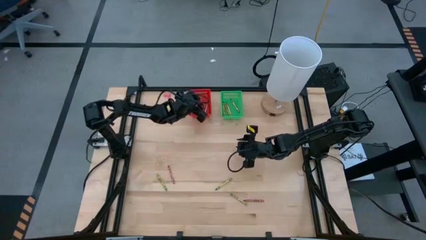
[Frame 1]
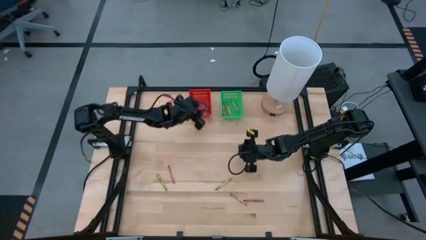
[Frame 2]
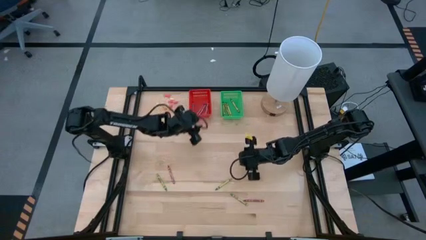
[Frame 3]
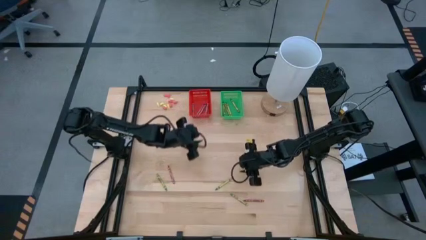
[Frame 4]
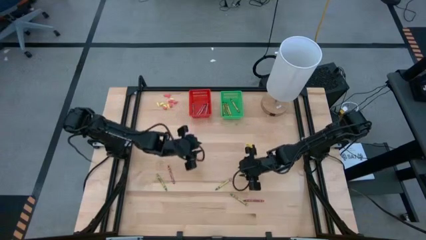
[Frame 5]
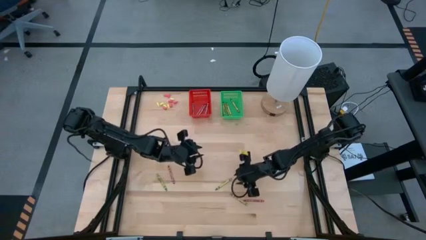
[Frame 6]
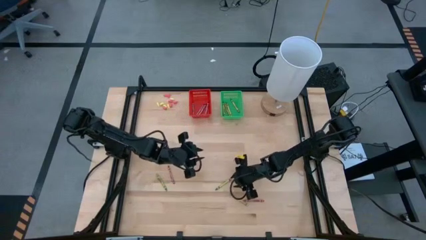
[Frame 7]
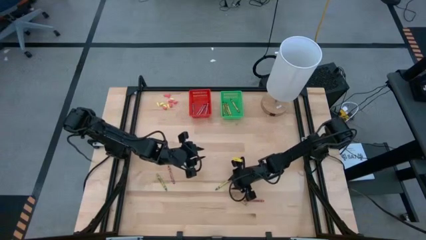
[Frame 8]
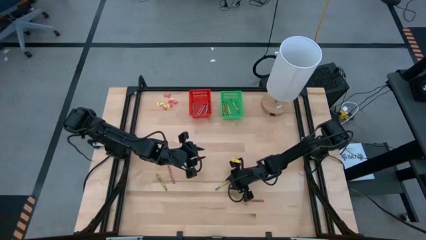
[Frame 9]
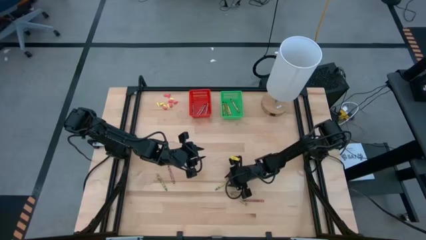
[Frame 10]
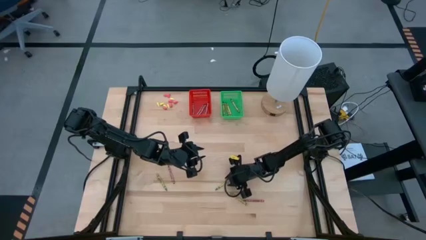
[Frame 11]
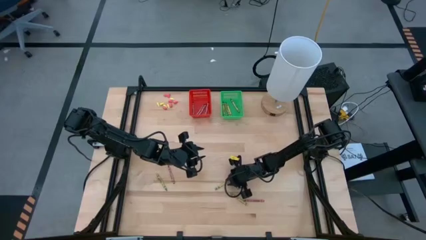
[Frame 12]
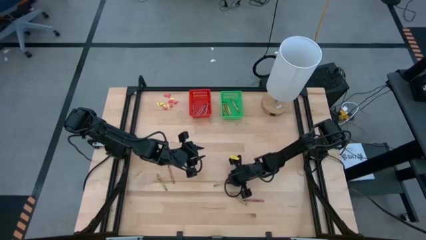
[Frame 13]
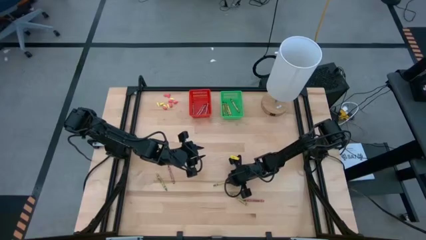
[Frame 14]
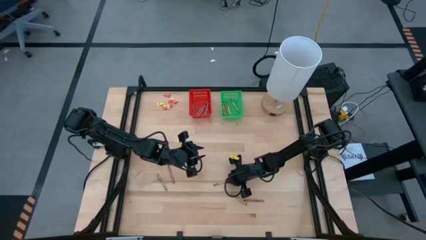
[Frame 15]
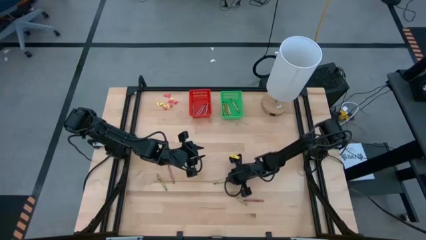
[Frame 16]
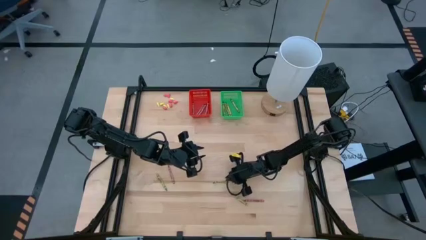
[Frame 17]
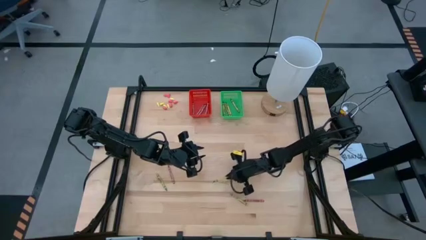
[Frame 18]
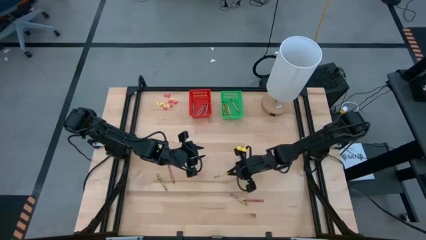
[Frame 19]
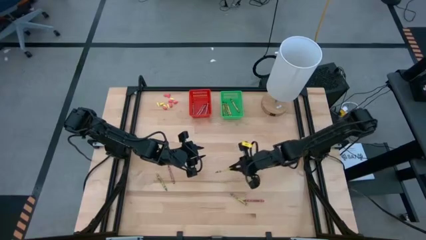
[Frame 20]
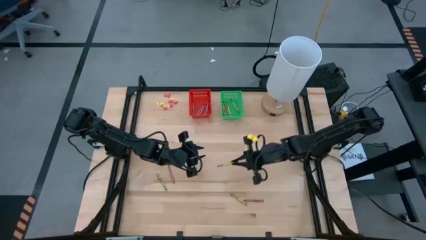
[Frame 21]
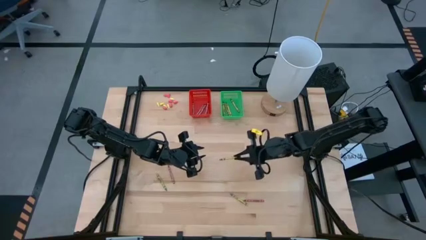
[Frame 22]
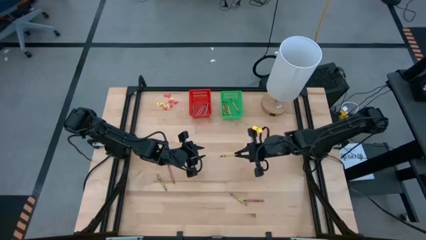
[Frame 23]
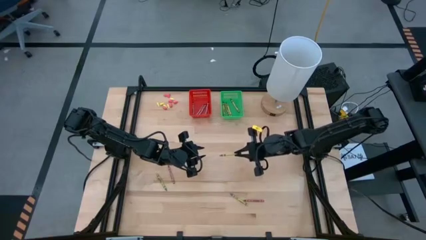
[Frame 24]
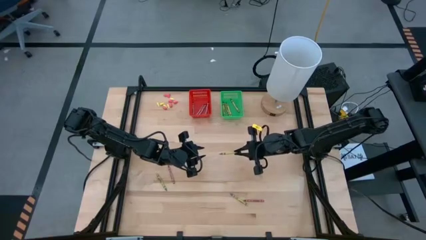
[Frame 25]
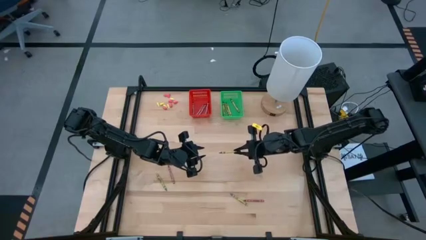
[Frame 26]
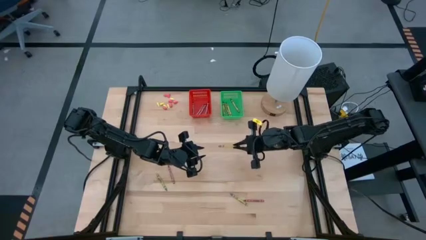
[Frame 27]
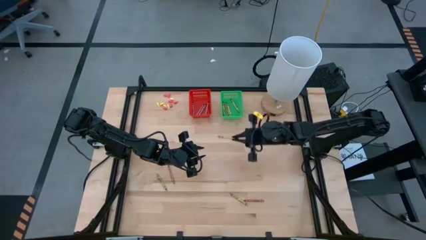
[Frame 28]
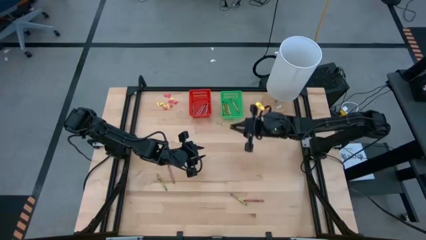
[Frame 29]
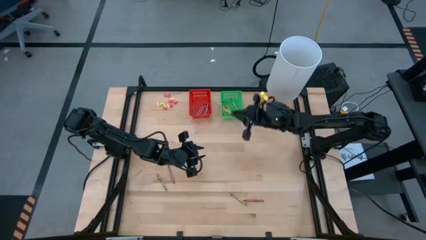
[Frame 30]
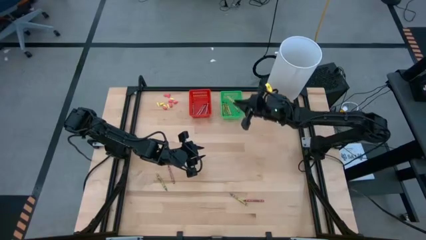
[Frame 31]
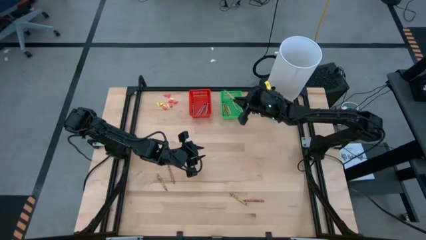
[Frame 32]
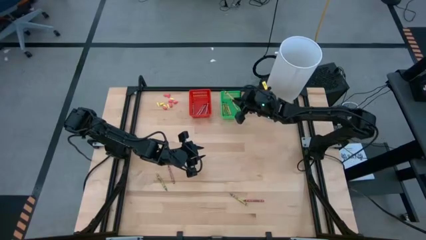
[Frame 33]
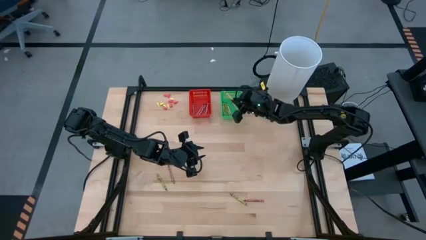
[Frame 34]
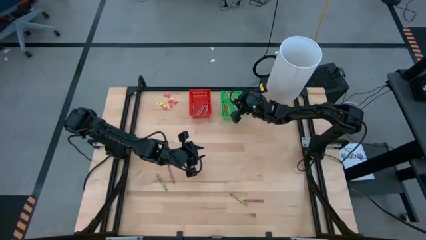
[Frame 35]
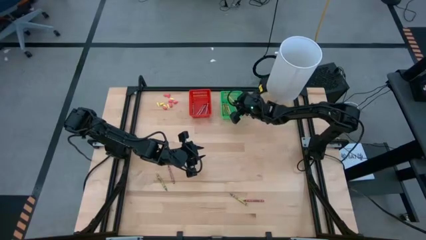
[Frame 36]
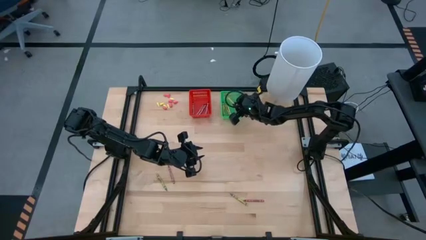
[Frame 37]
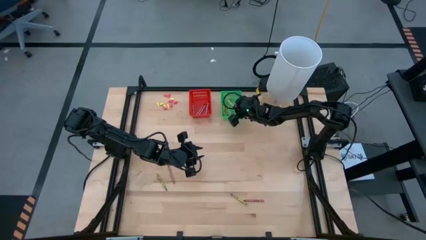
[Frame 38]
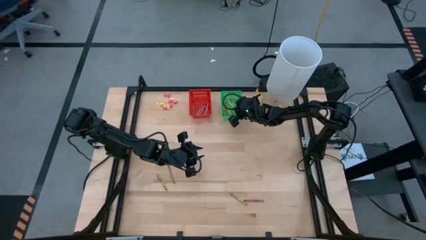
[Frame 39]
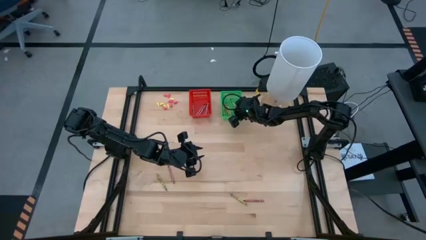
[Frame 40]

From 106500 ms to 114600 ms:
Task: Sort crayons
Put the green crayon into the green bin

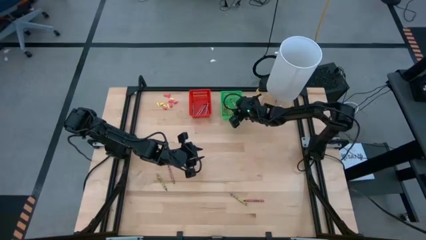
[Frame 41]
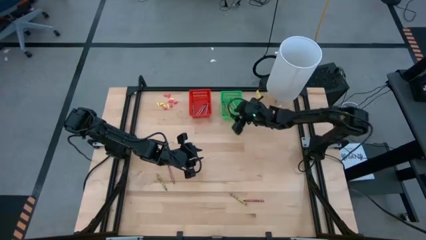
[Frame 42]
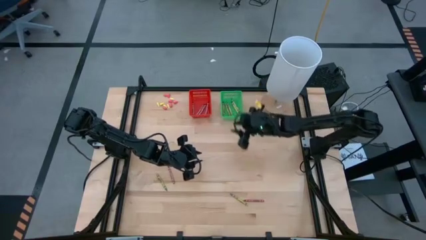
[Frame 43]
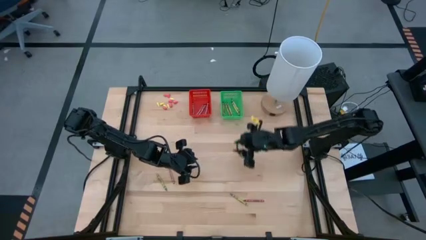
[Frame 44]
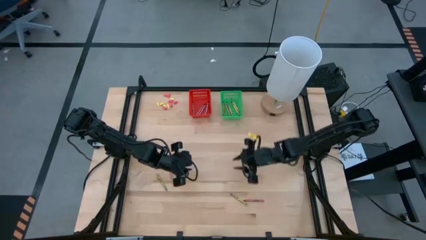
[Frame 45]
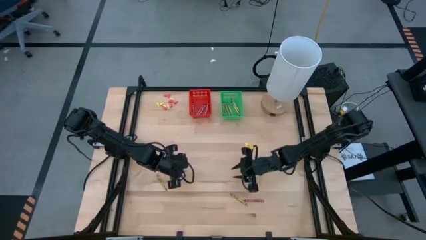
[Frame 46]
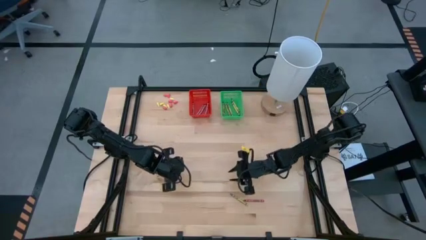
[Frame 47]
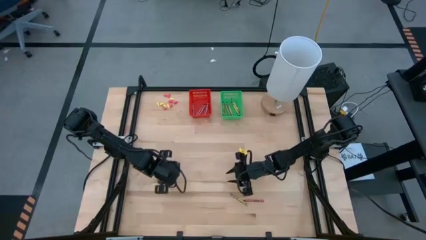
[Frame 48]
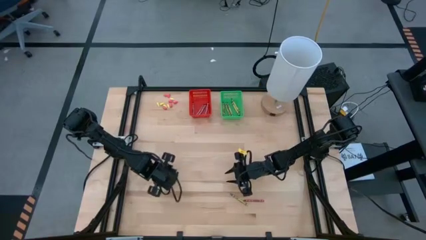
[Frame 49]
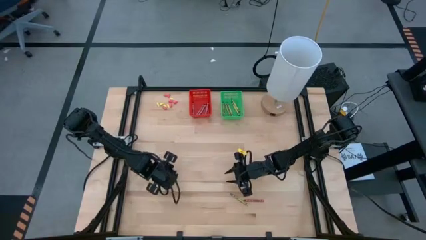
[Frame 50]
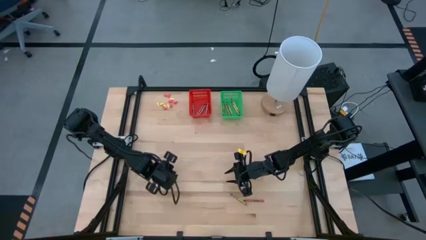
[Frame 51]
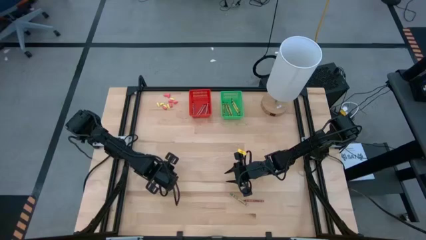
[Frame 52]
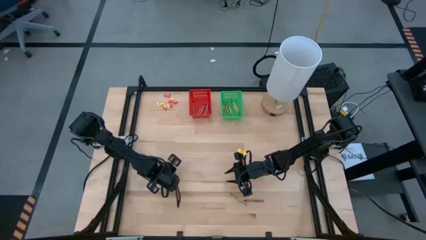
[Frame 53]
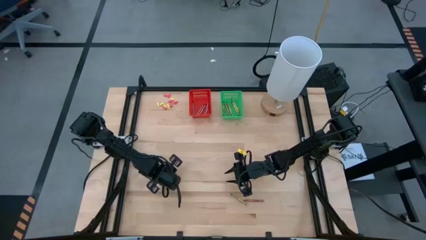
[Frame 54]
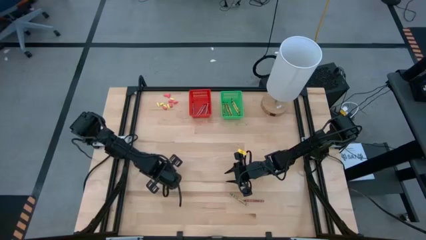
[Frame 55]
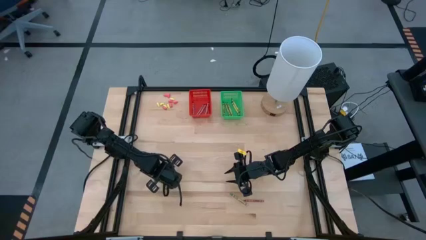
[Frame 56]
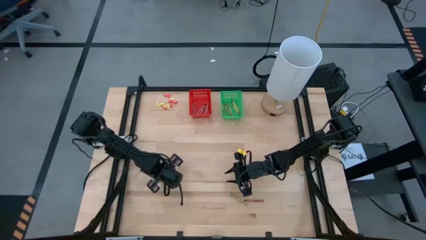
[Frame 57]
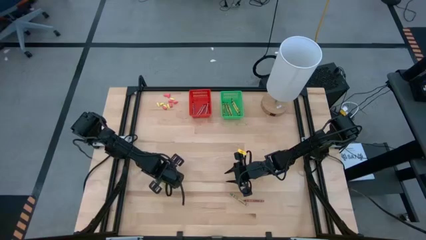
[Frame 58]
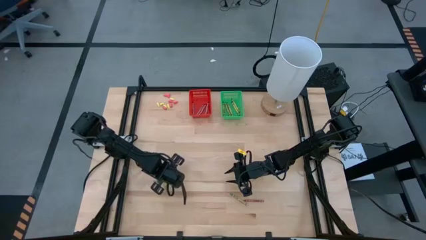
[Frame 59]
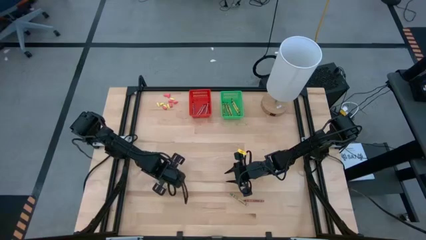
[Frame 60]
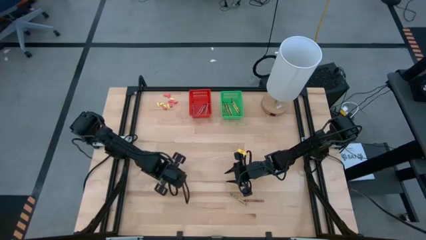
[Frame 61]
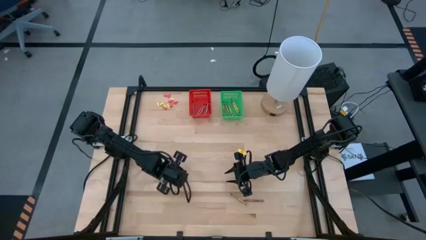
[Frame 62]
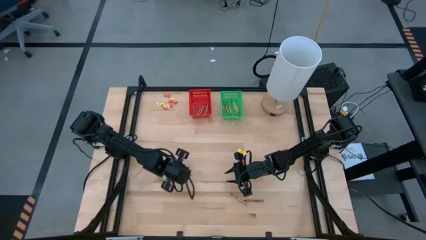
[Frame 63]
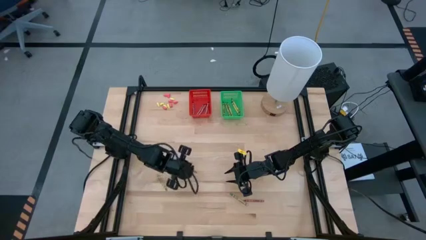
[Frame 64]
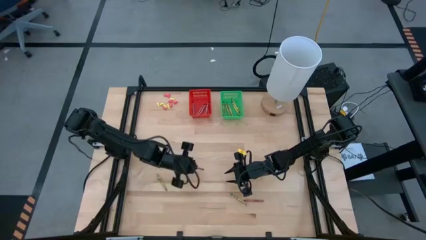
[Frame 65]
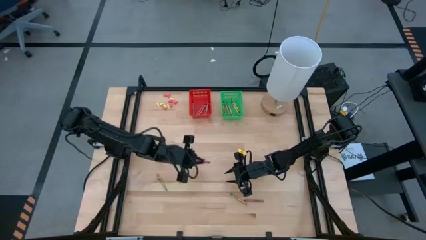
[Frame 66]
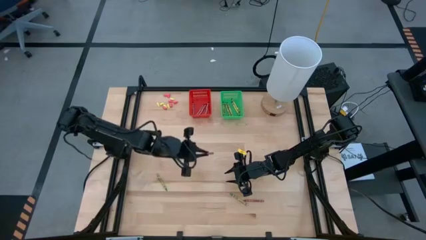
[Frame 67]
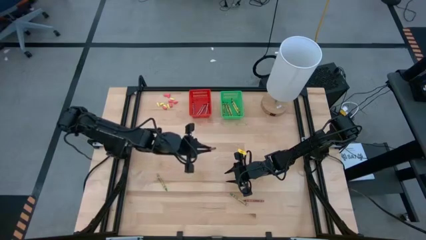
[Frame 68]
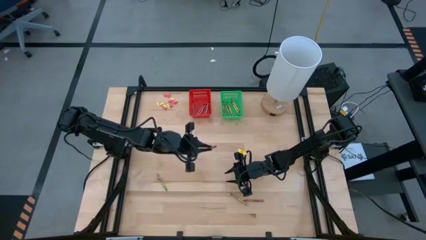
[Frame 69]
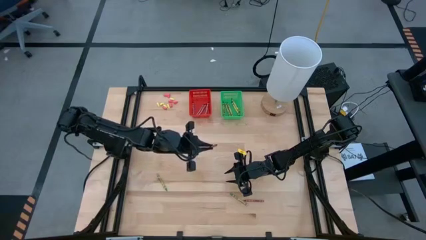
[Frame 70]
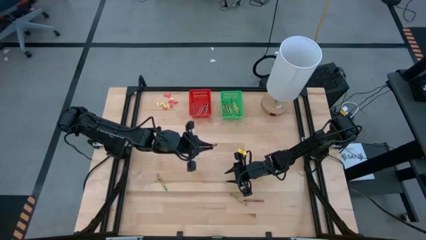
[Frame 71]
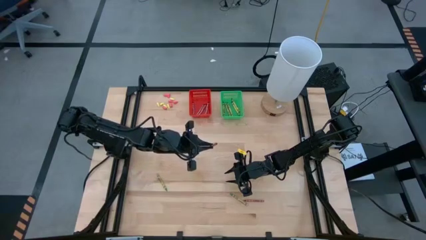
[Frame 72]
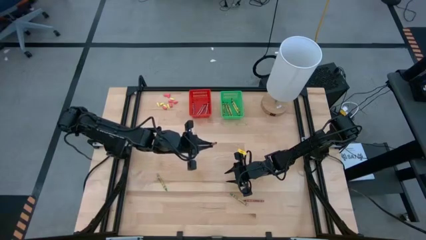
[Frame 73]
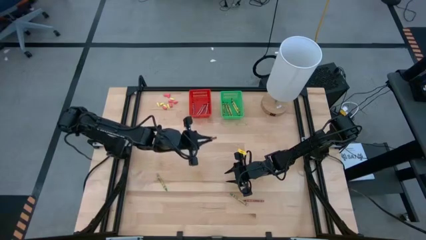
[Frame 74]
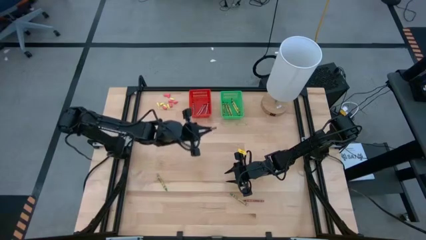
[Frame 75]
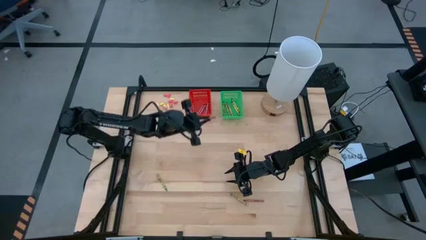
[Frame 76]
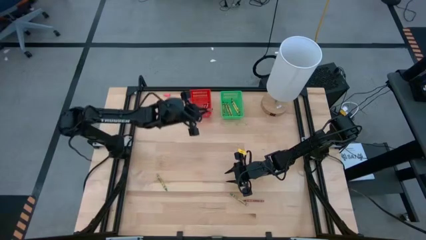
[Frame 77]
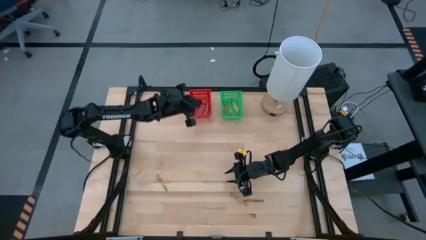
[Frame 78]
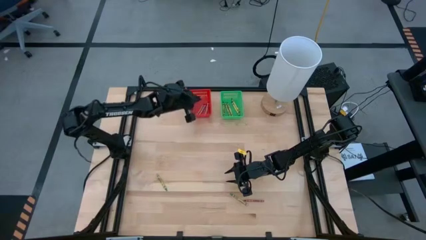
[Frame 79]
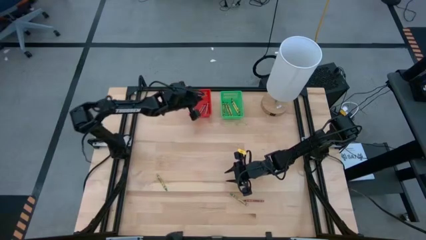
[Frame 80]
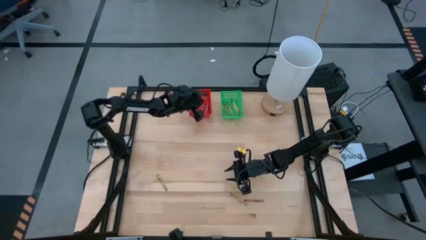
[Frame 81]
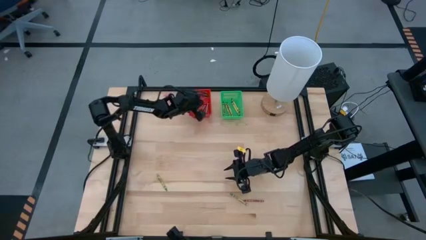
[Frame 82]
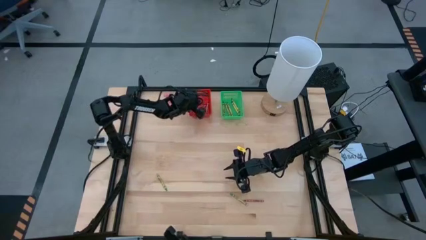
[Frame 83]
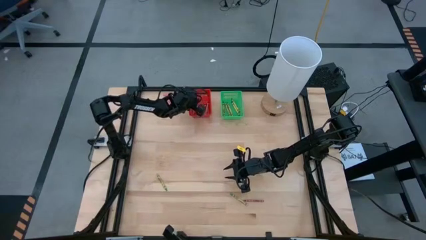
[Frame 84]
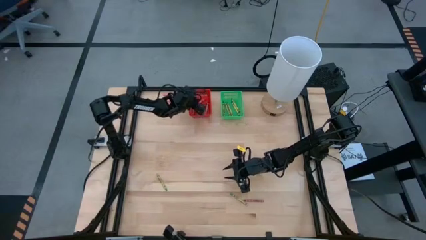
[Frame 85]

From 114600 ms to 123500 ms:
Put the red crayon into the red bin
